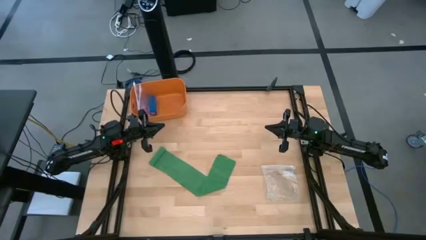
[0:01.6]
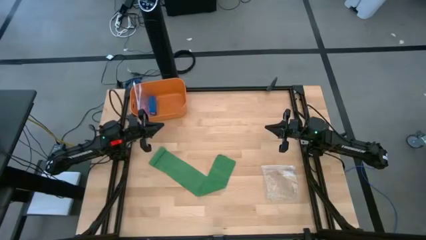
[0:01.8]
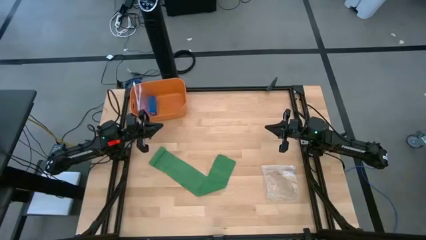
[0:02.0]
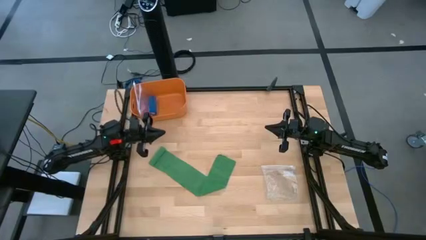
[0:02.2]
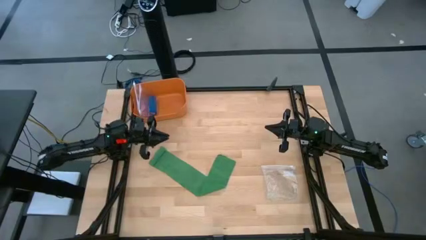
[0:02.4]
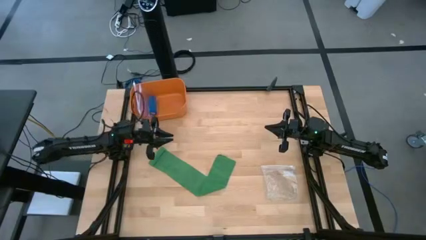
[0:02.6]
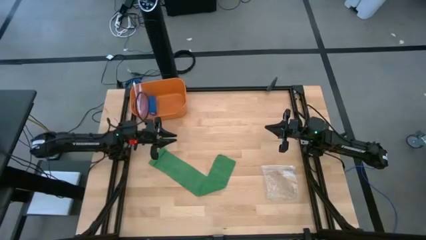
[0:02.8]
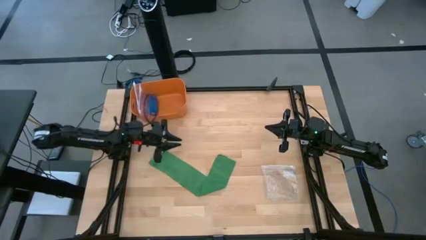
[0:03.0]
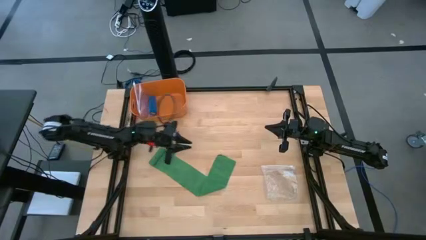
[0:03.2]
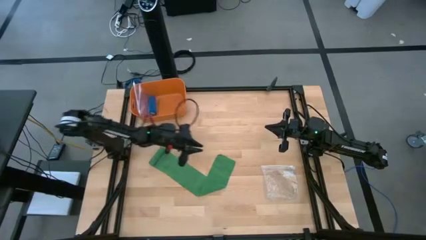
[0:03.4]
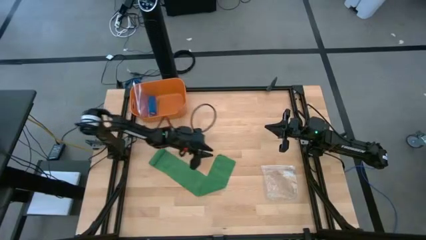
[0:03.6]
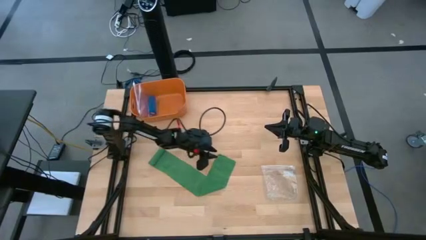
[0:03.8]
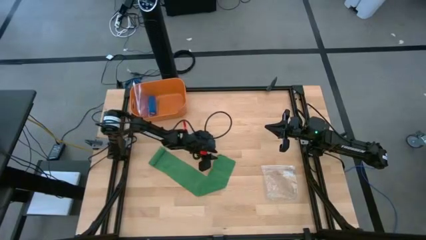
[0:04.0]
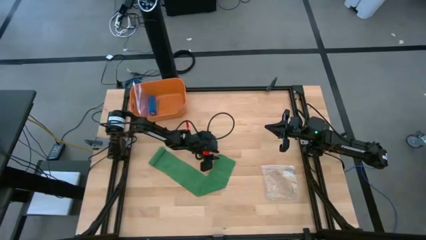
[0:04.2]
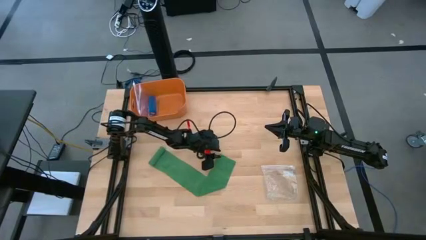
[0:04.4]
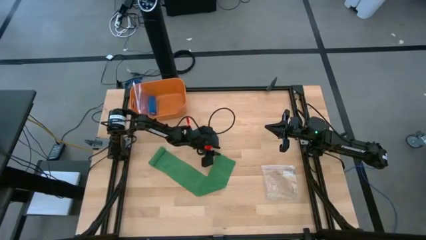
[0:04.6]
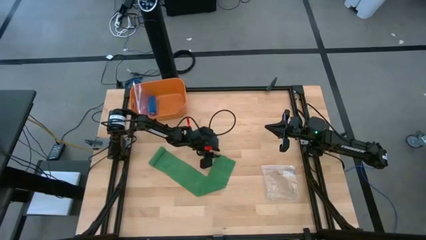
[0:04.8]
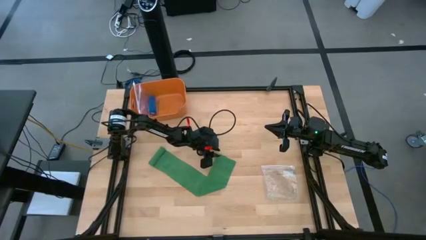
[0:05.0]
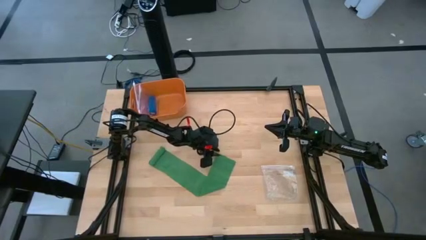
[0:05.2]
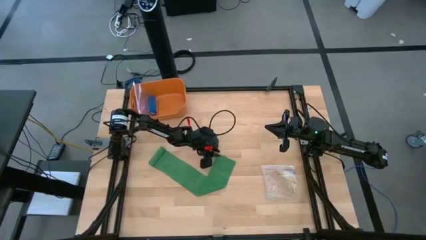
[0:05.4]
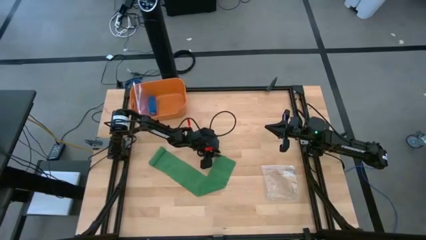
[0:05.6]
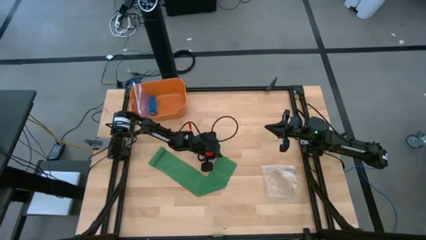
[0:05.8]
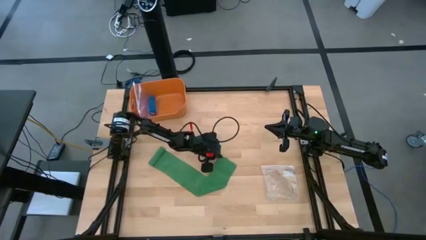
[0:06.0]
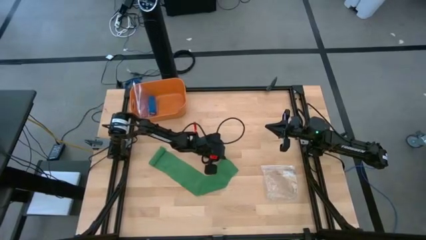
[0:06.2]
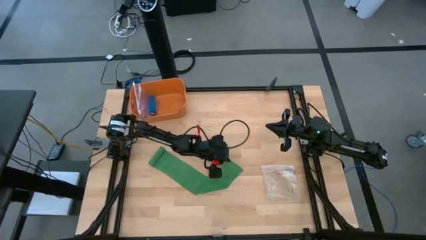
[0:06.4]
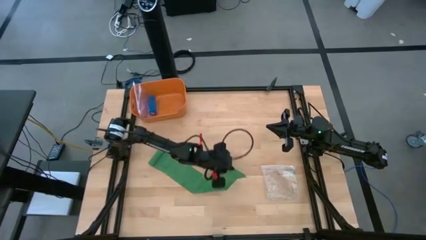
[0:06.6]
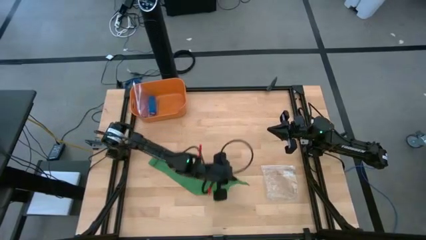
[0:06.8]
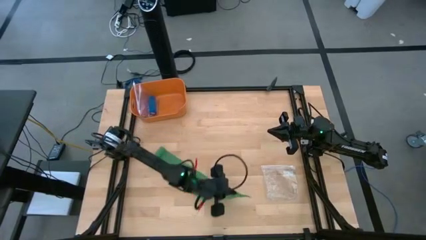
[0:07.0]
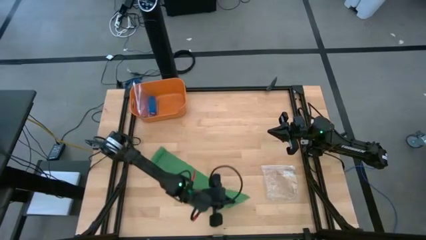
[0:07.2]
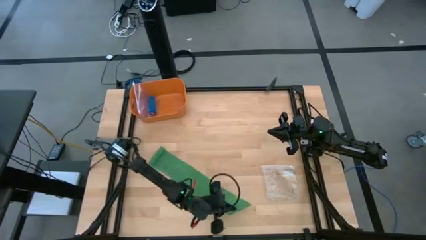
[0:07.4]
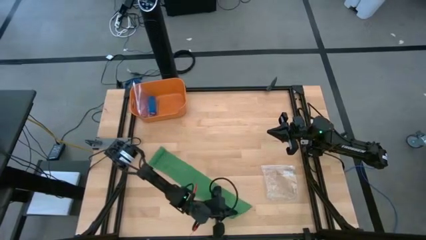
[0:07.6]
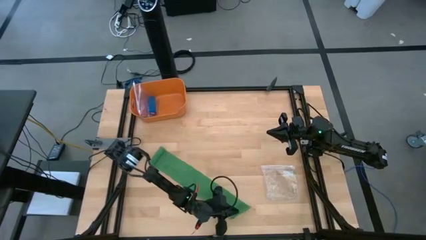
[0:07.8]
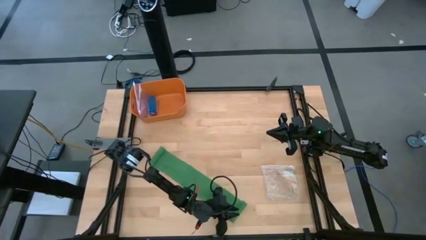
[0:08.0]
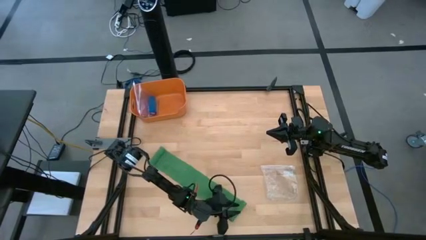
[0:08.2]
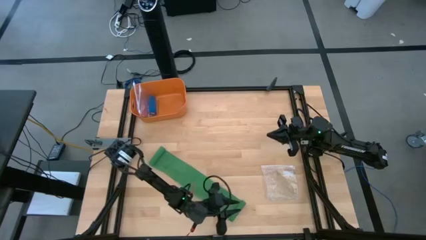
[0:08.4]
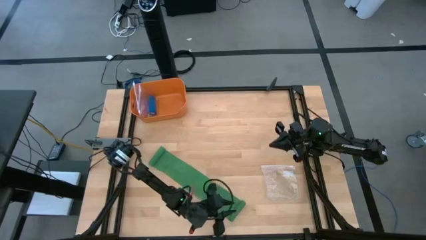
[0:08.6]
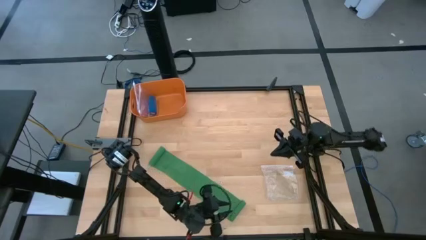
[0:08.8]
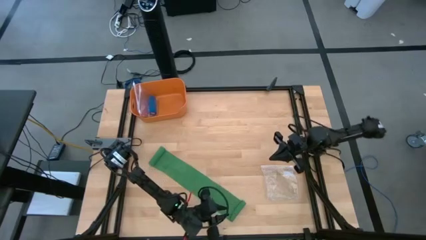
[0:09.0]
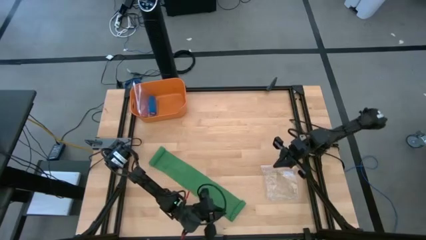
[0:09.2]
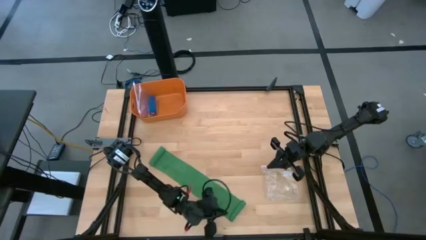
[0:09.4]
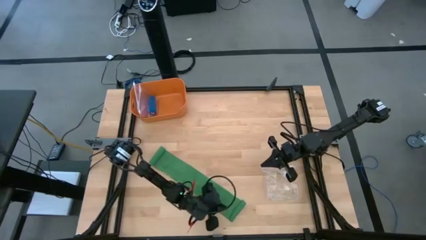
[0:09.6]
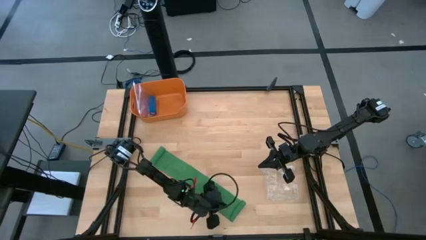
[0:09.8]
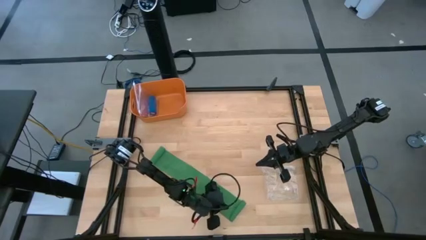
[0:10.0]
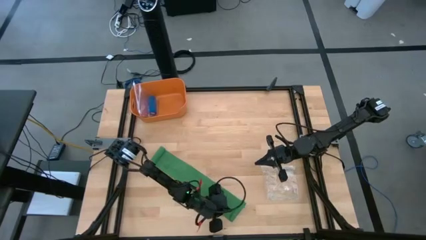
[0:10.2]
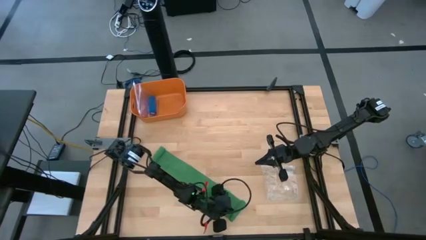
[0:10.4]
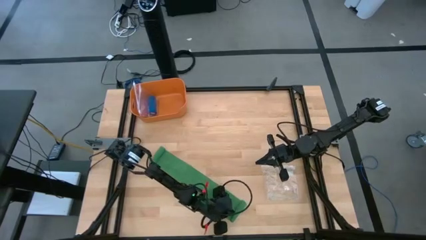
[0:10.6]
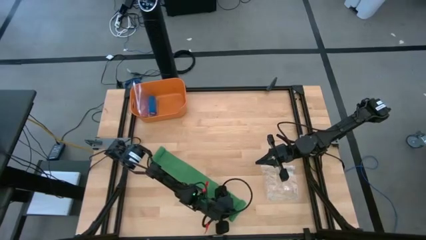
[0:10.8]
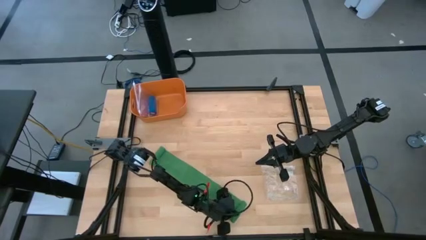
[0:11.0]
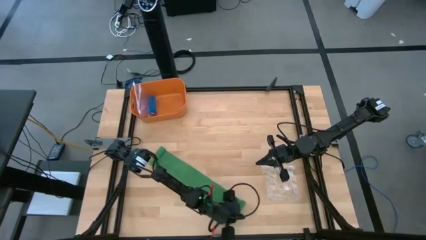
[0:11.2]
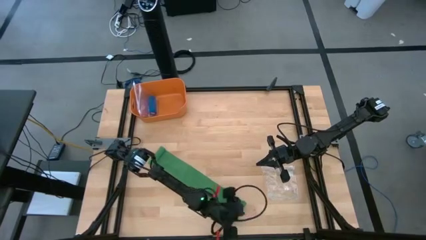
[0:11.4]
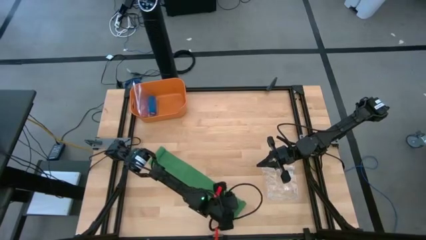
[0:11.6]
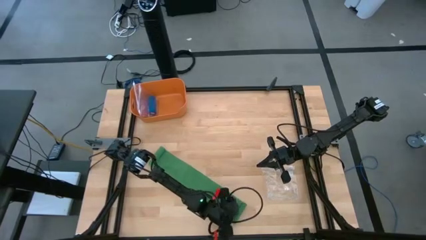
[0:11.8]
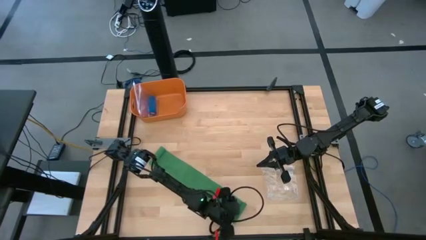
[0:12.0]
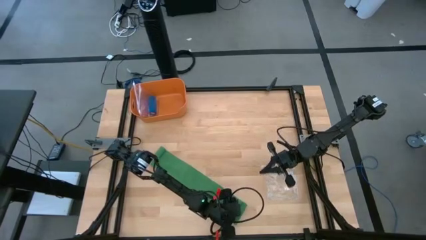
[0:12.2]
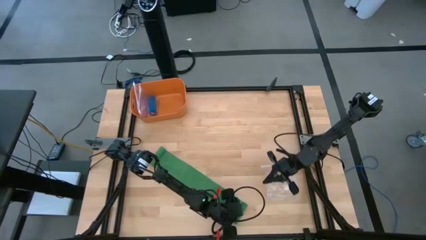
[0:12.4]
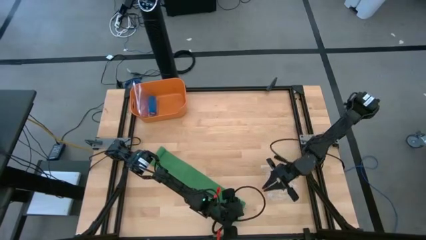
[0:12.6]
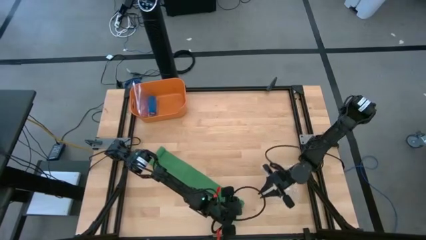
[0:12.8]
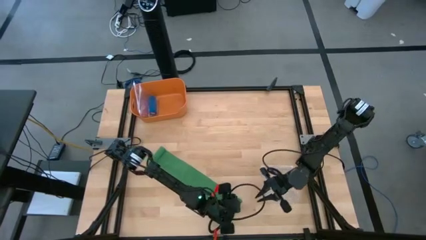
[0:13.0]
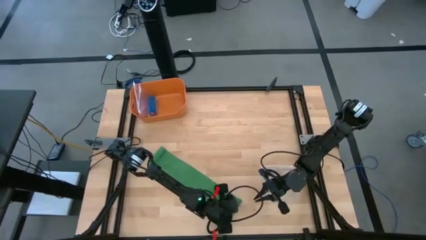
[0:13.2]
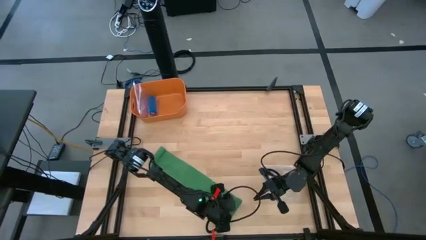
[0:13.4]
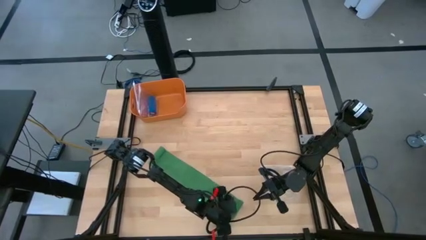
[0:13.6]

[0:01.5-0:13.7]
Task: Roll bandage
Roll the green bandage
